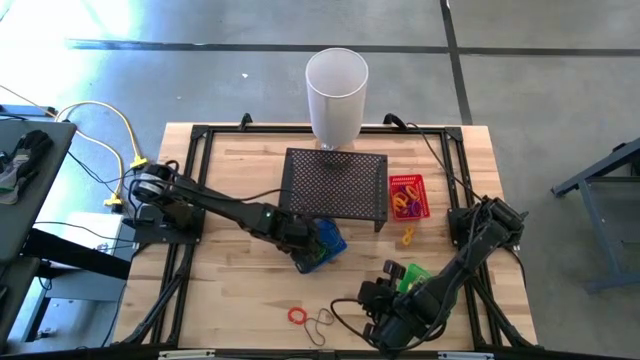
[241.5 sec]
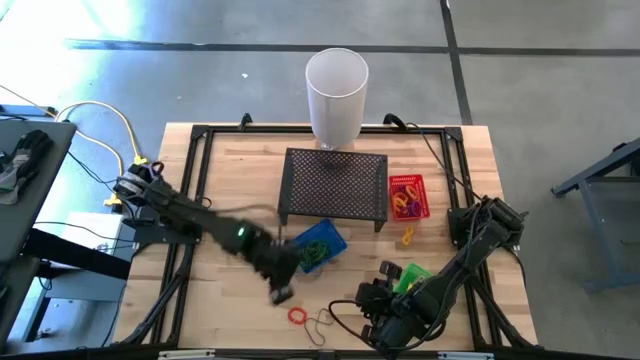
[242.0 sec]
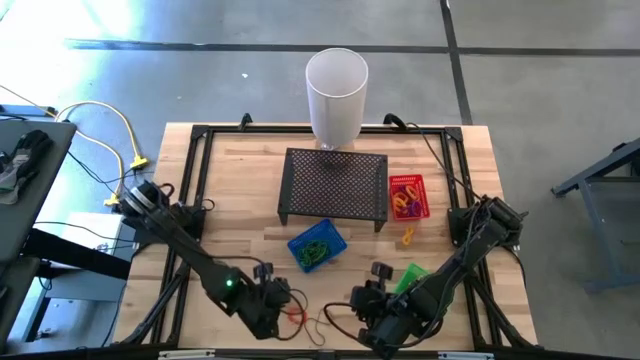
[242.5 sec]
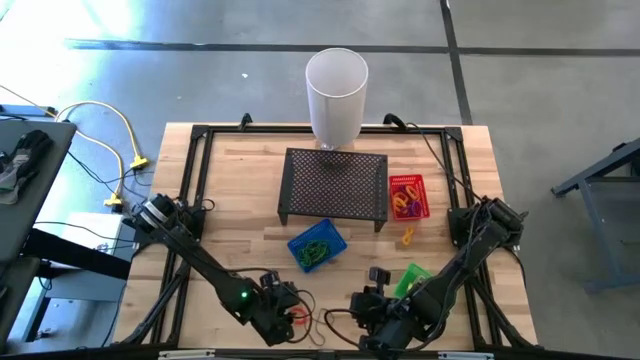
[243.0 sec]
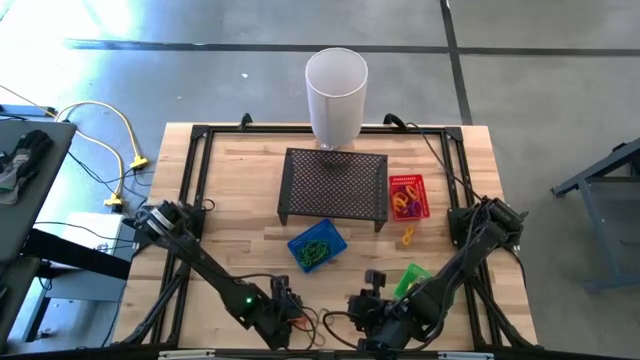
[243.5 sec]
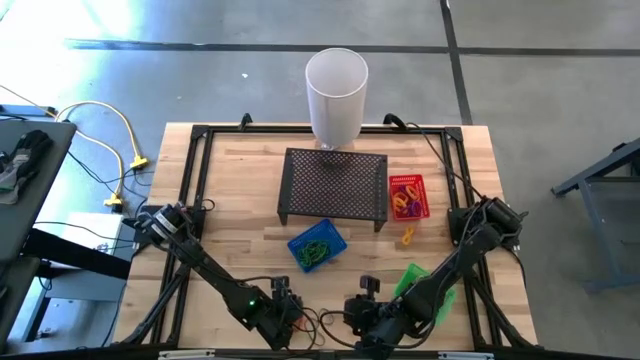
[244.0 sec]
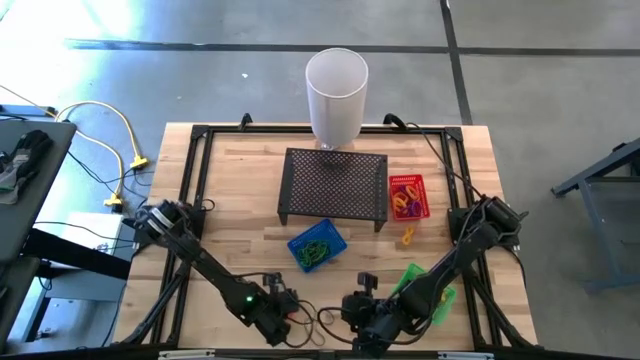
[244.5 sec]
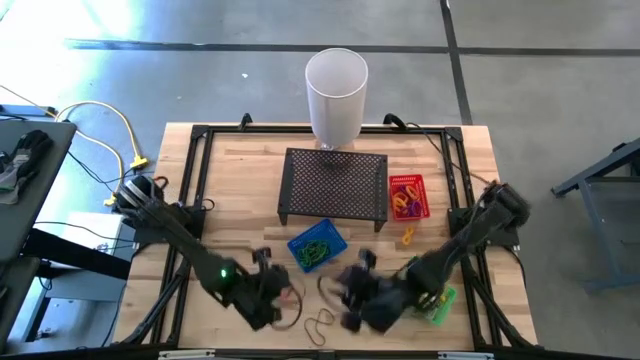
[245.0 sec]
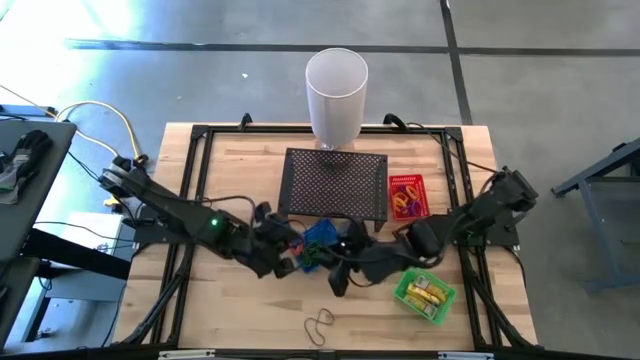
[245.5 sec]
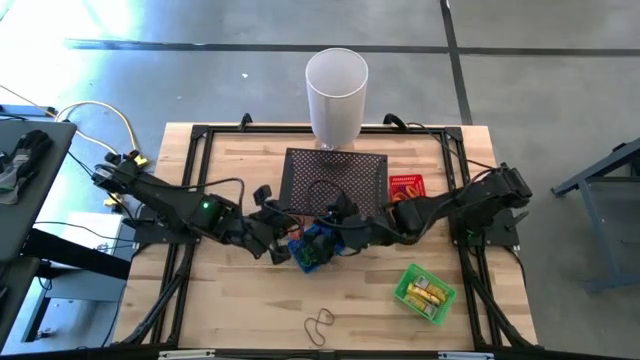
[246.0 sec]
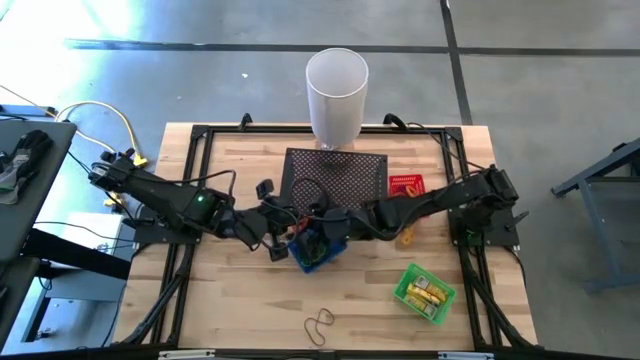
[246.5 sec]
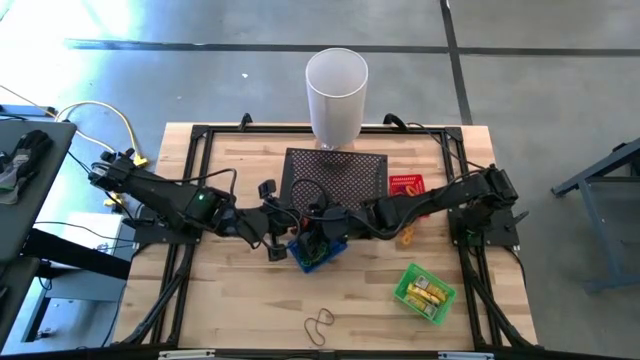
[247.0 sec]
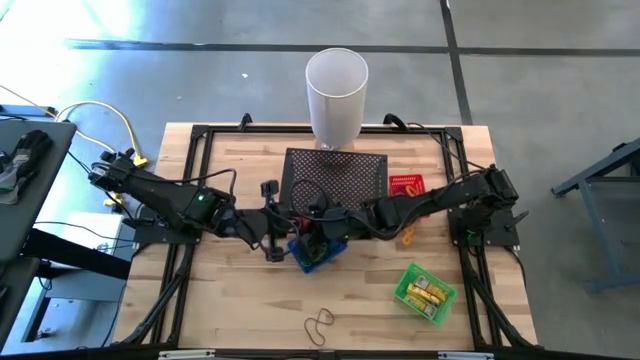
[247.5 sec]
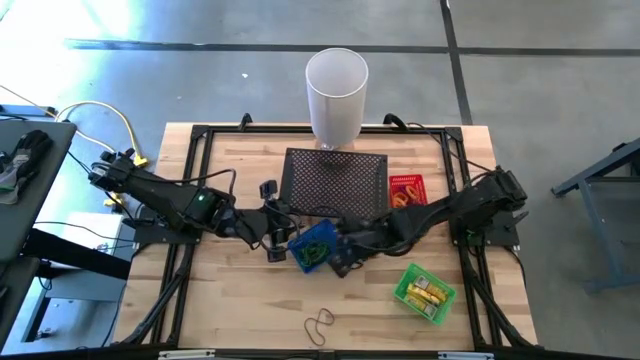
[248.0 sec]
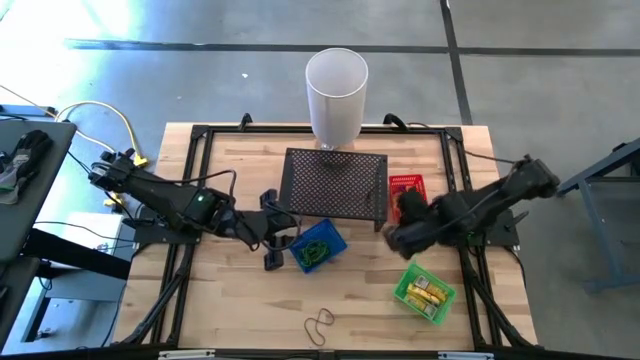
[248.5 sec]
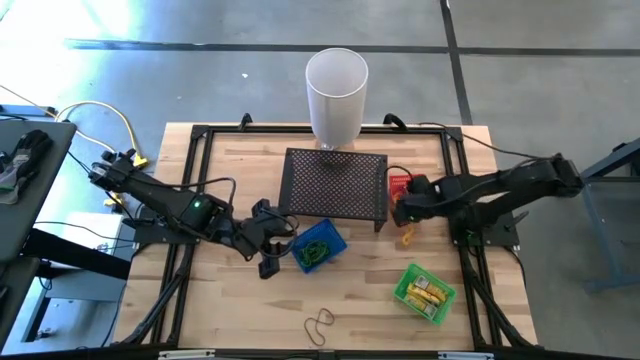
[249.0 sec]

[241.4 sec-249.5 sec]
Task: Pick & Place Office Desk Supplies
Put the orange spring keychain into the red bin

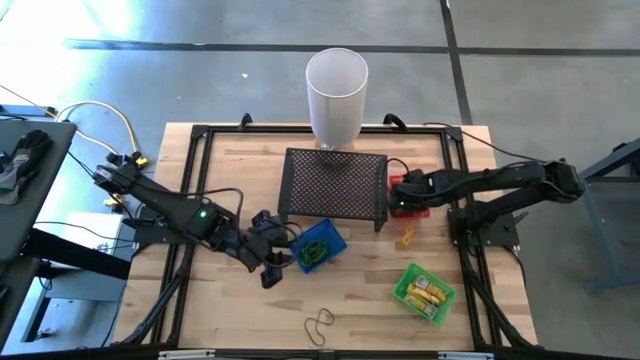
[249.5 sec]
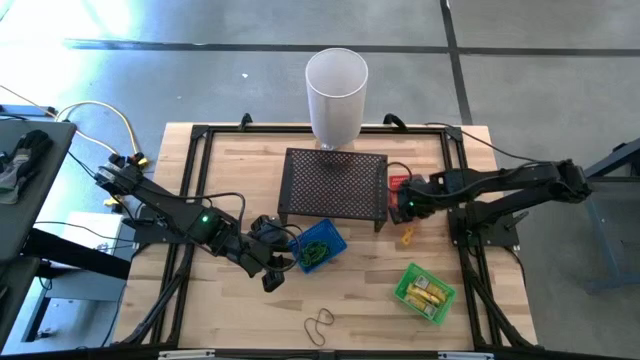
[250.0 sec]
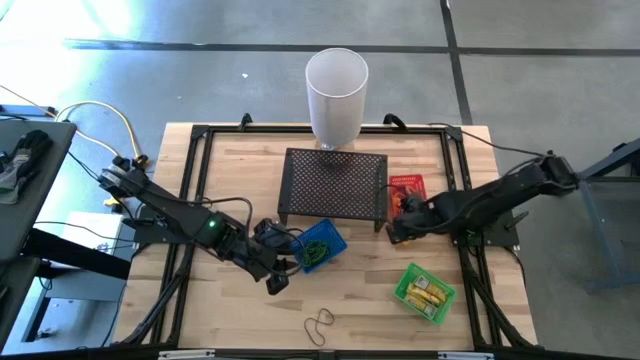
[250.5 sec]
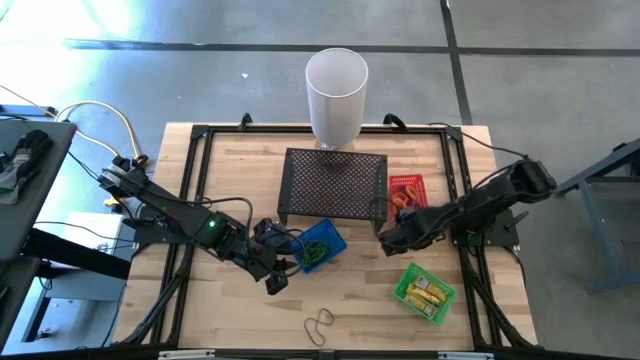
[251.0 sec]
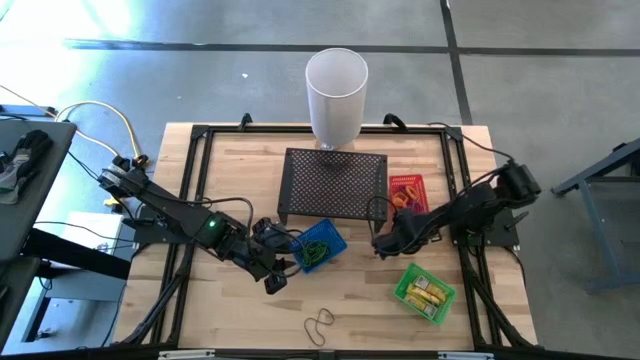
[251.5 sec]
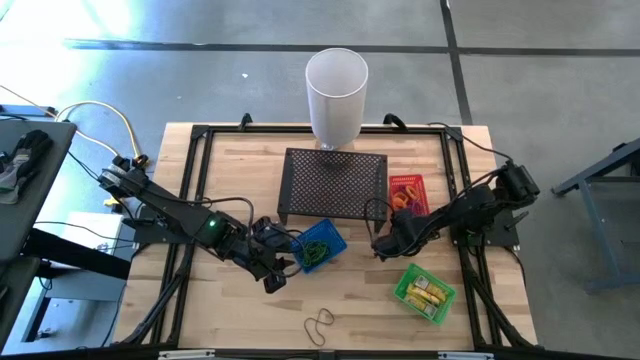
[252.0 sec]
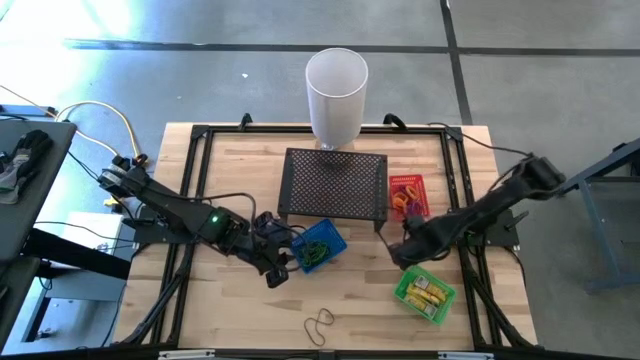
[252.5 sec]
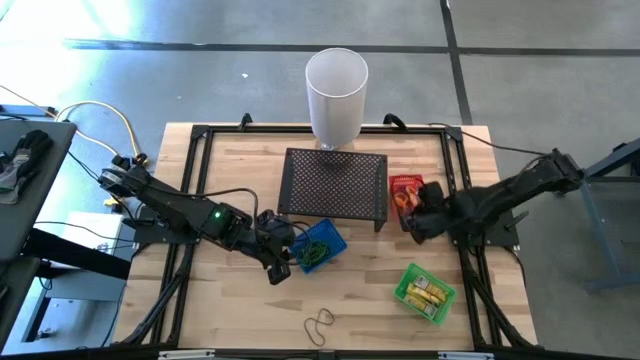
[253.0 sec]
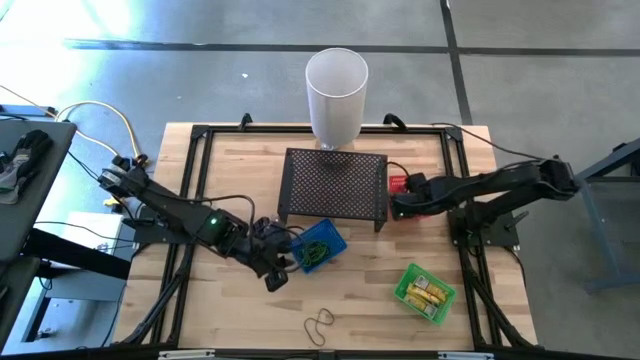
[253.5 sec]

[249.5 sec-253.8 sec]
Put the yellow spring keychain into the red bin

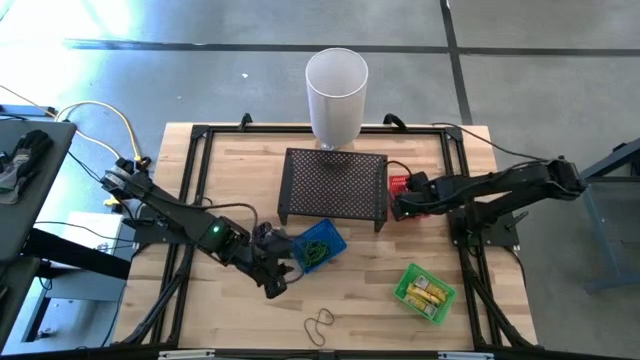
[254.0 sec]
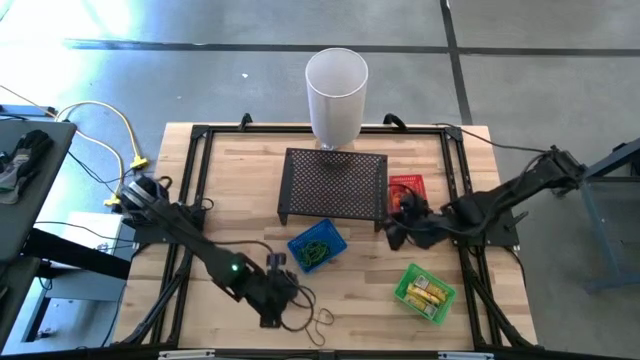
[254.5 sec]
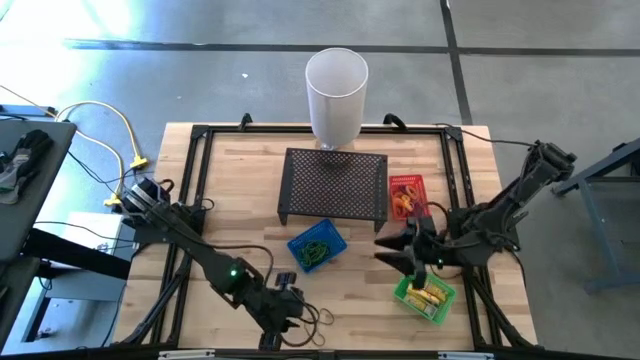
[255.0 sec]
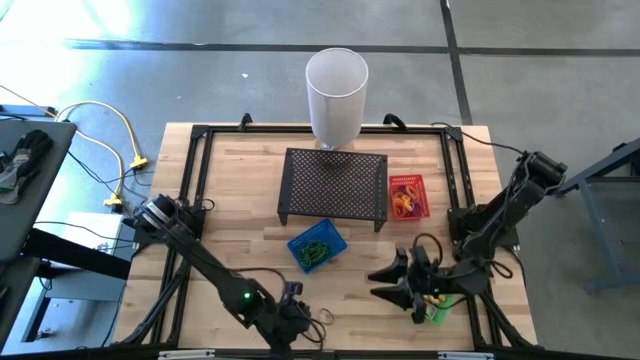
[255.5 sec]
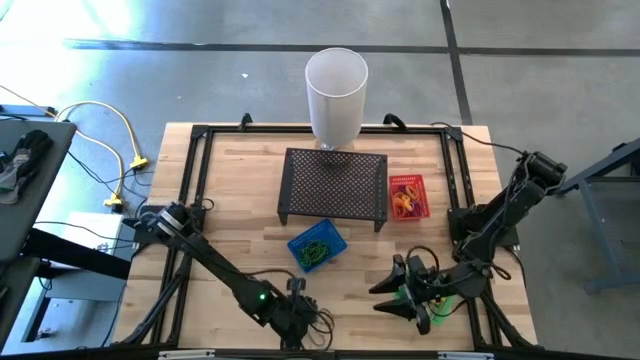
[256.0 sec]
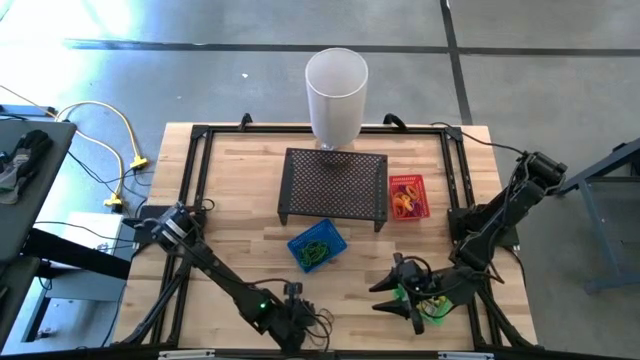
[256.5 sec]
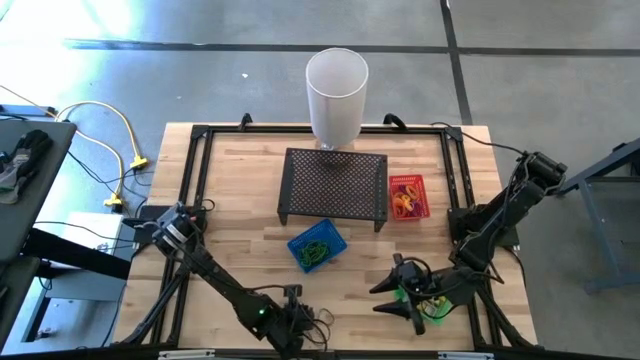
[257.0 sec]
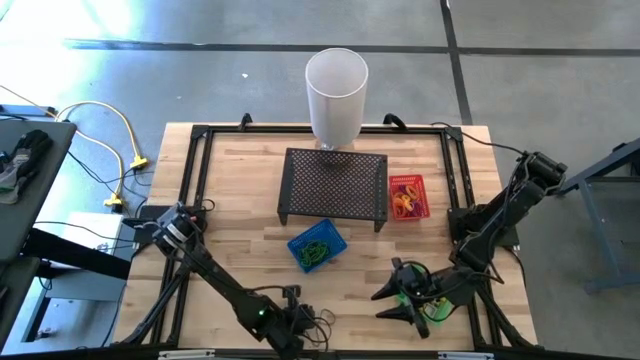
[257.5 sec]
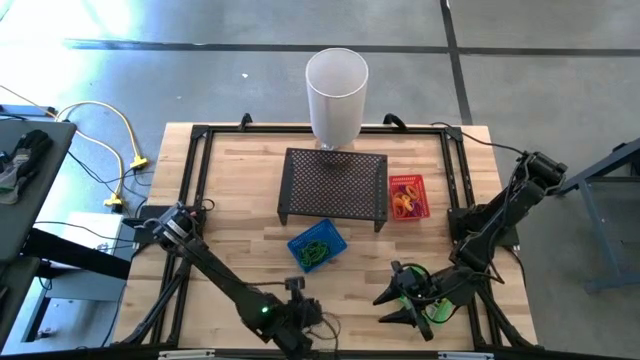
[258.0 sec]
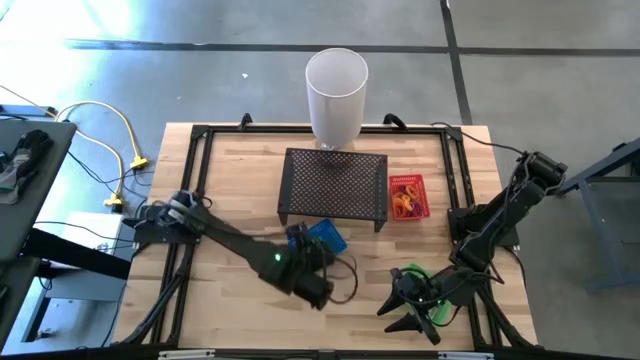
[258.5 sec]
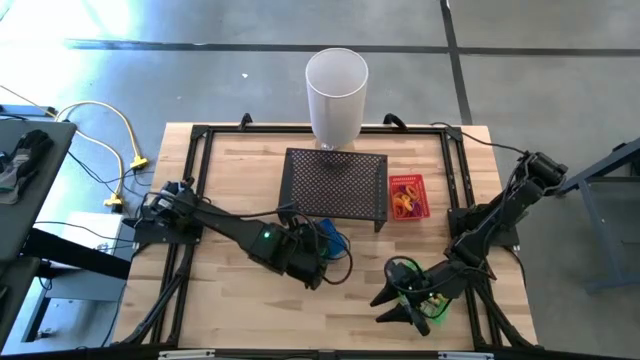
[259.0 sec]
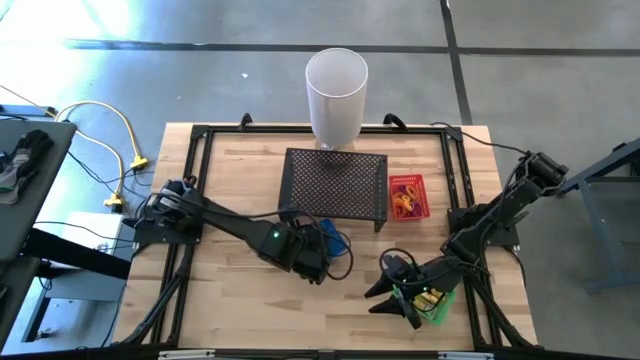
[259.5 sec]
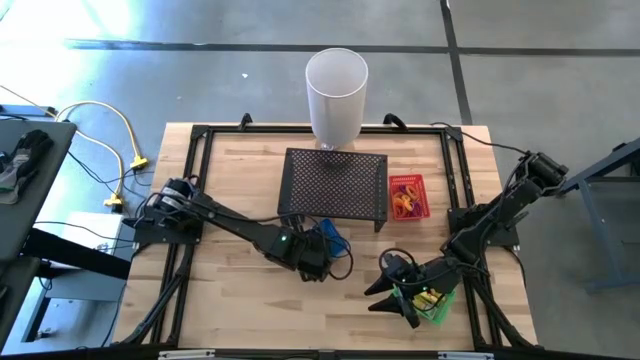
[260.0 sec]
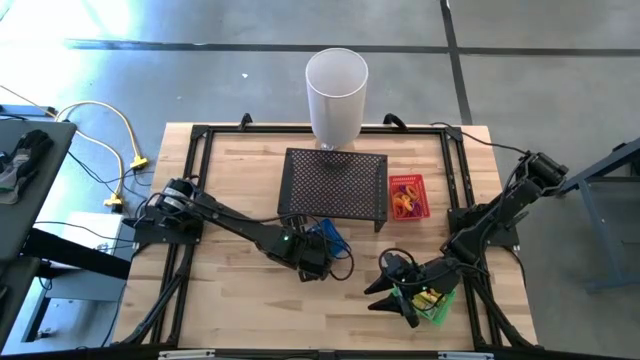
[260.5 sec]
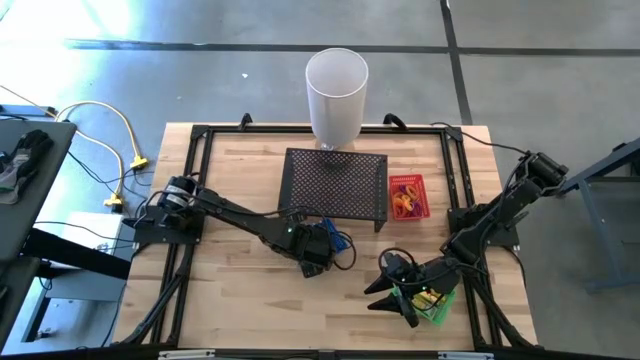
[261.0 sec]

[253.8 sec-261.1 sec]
Put the violet rubber band into the blue bin

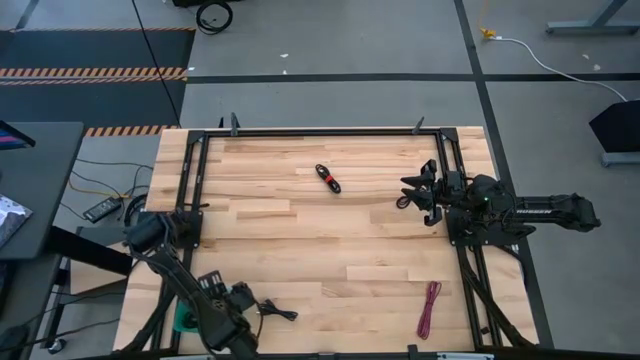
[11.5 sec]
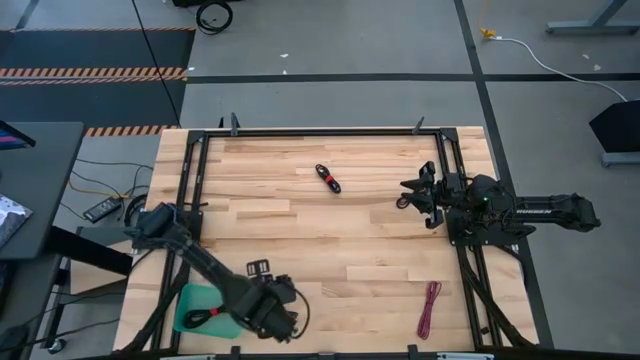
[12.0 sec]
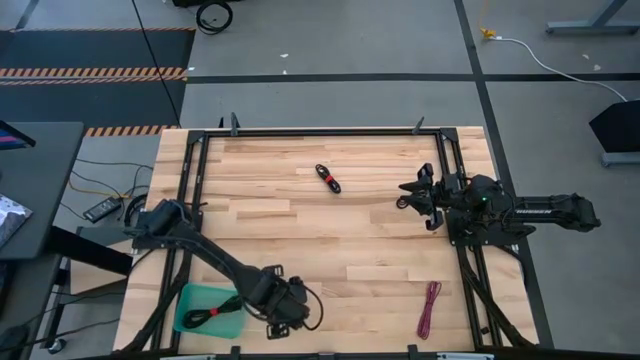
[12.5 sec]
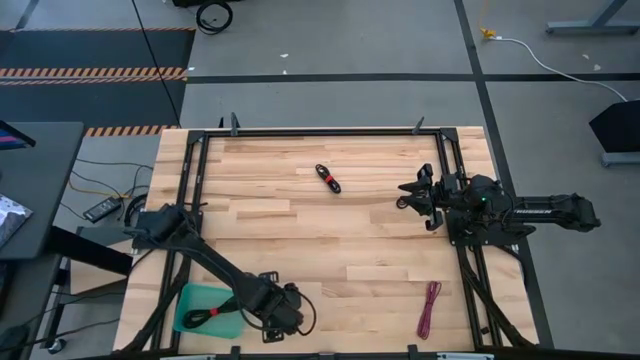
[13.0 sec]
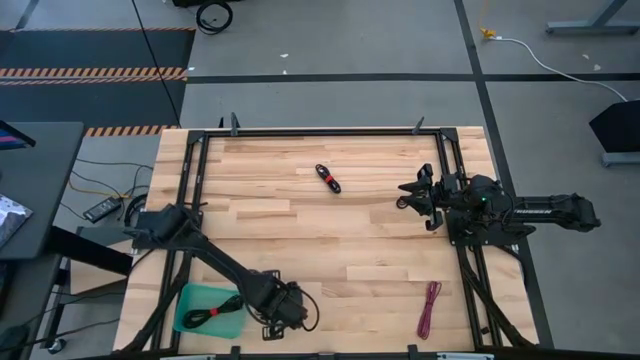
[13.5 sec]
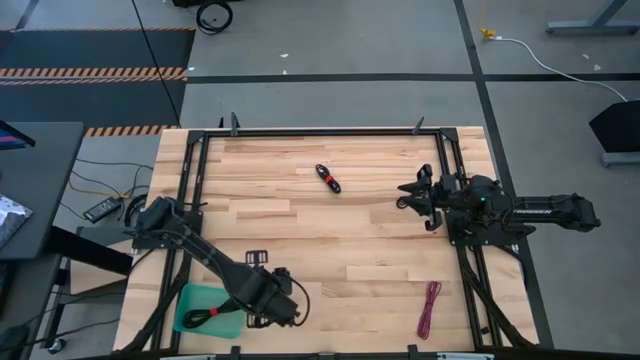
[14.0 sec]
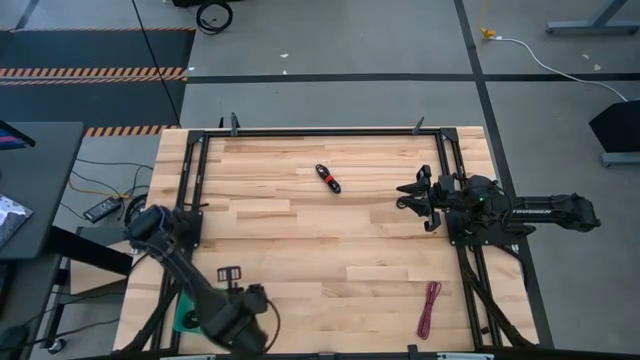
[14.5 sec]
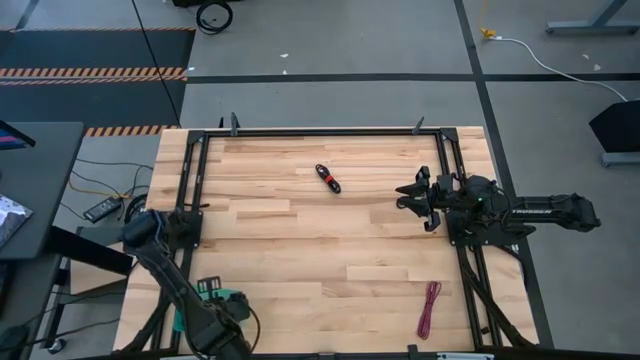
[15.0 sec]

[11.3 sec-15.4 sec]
Task: Pick and place USB-C Cables
Put the black charger cable into the green bin
